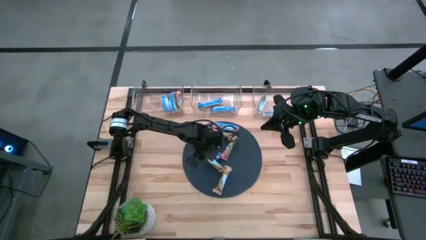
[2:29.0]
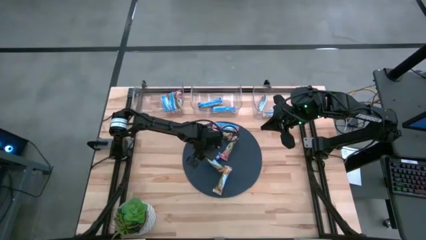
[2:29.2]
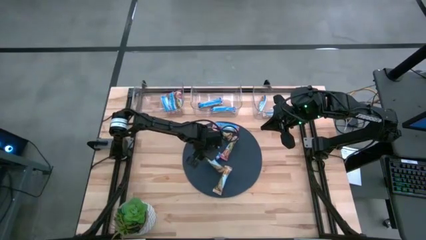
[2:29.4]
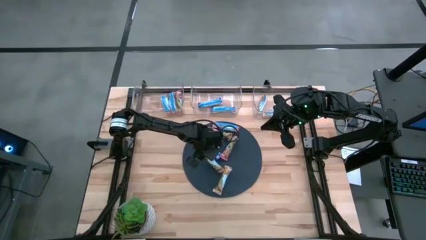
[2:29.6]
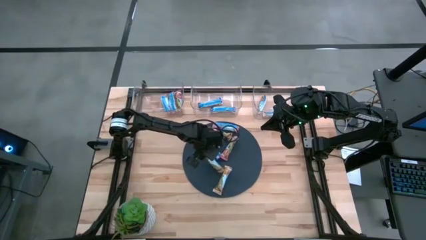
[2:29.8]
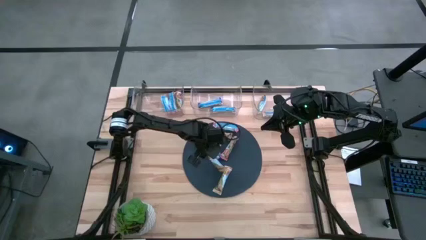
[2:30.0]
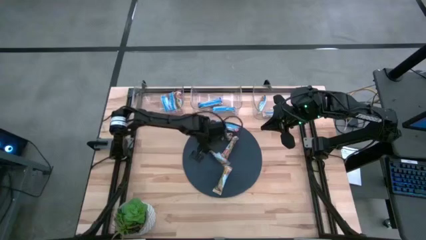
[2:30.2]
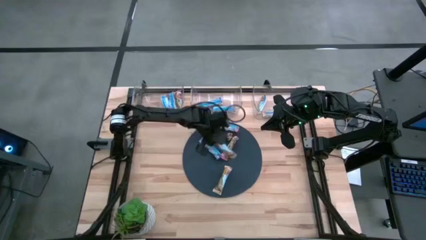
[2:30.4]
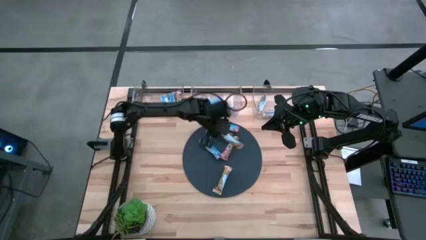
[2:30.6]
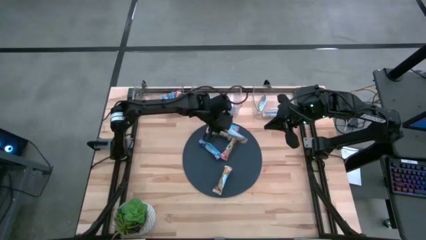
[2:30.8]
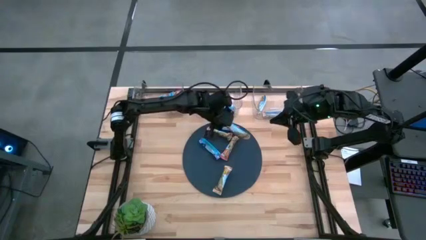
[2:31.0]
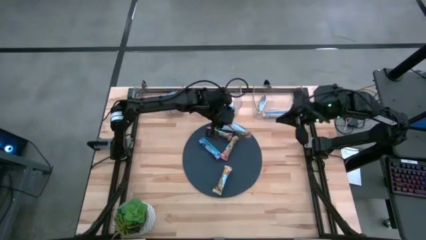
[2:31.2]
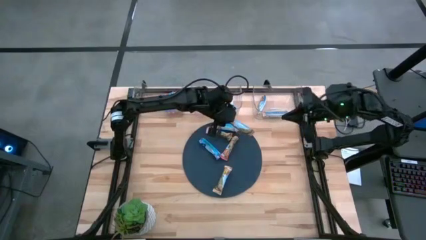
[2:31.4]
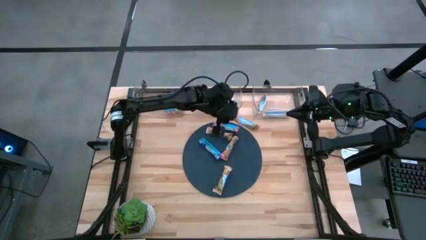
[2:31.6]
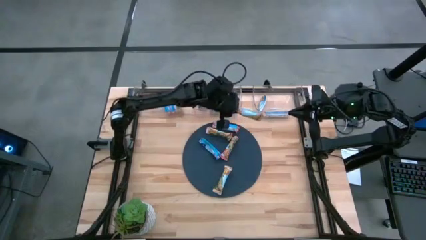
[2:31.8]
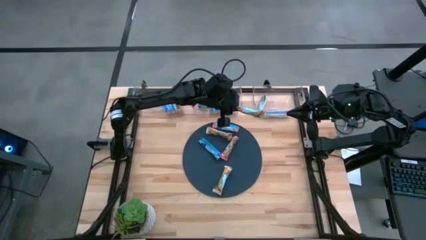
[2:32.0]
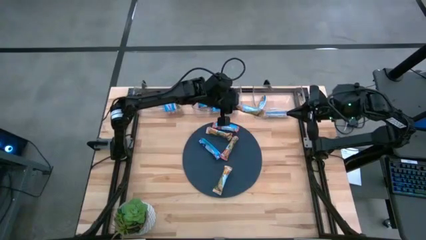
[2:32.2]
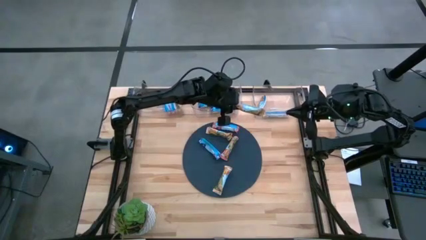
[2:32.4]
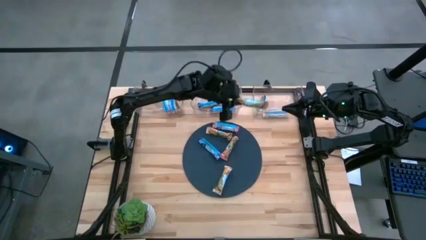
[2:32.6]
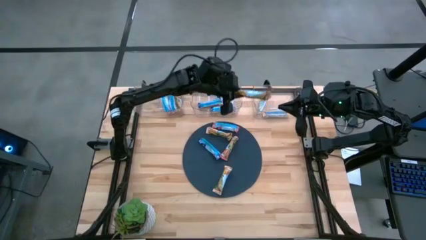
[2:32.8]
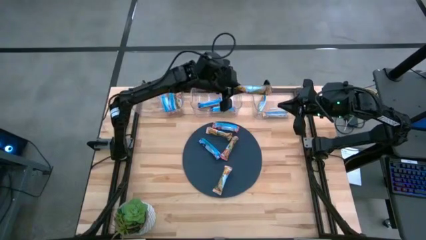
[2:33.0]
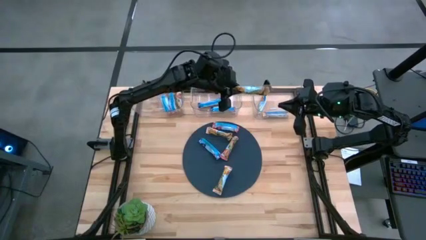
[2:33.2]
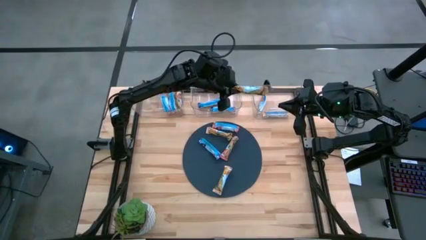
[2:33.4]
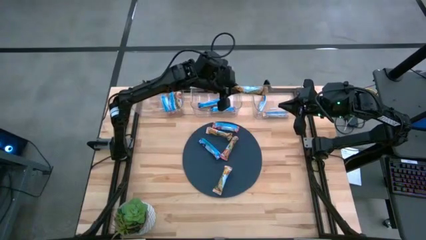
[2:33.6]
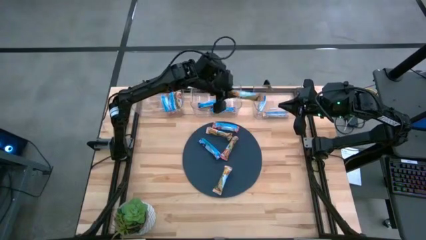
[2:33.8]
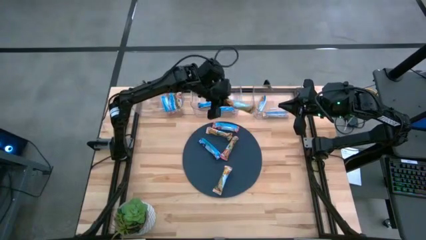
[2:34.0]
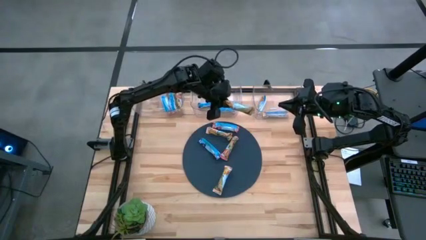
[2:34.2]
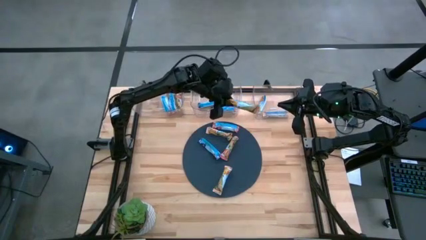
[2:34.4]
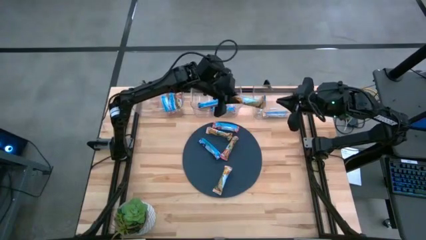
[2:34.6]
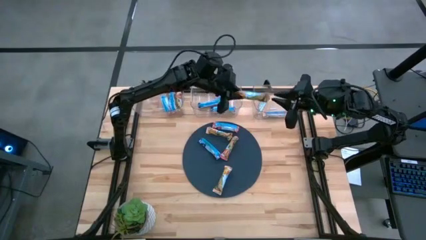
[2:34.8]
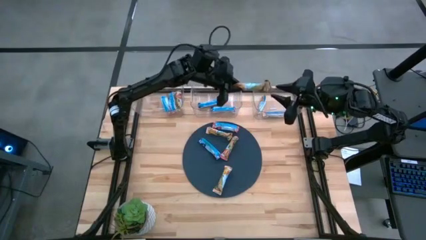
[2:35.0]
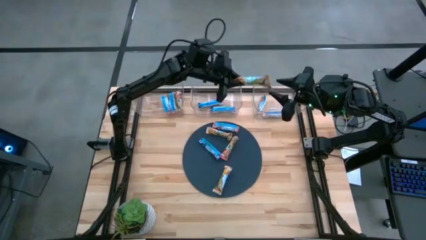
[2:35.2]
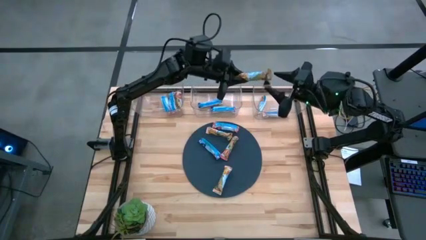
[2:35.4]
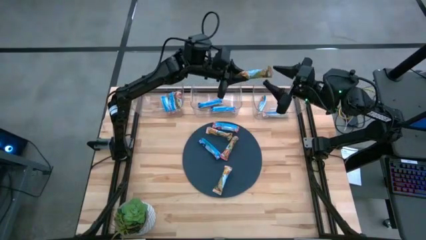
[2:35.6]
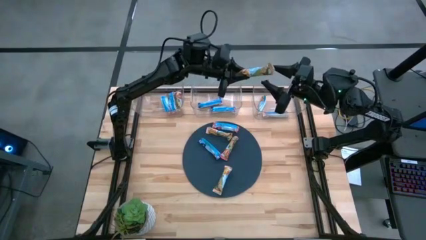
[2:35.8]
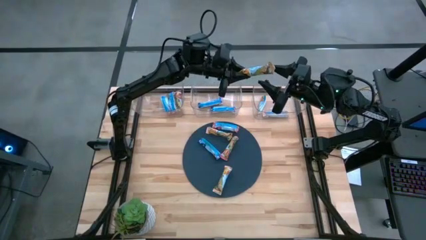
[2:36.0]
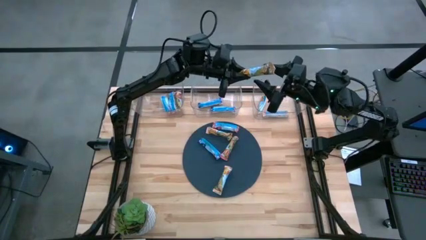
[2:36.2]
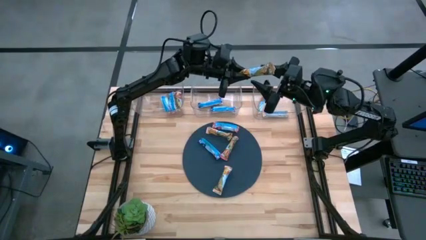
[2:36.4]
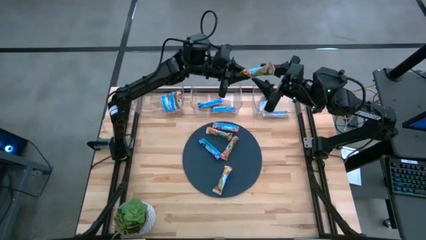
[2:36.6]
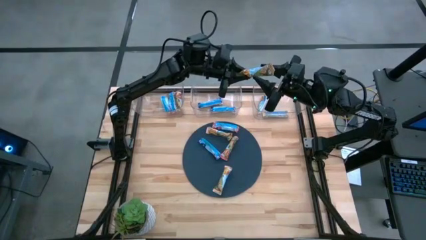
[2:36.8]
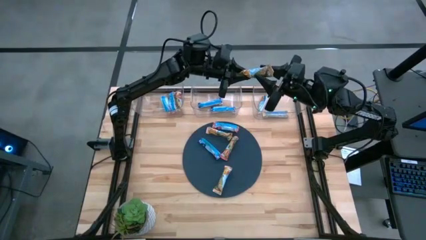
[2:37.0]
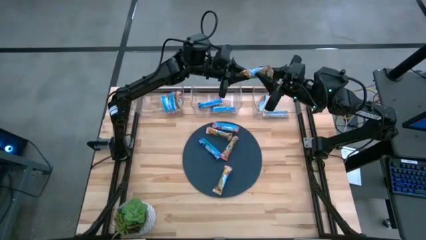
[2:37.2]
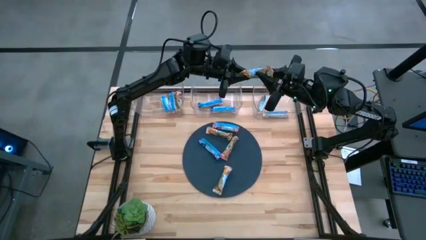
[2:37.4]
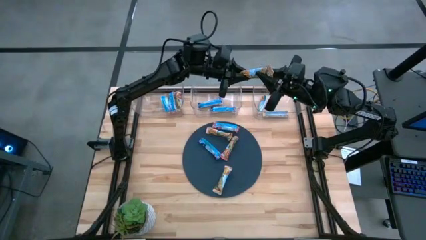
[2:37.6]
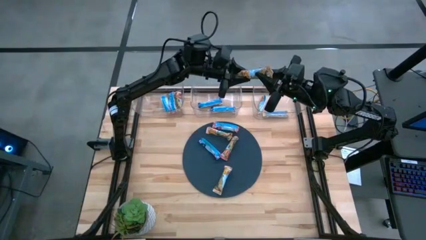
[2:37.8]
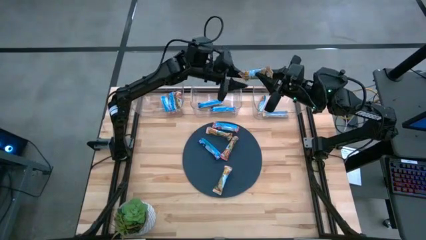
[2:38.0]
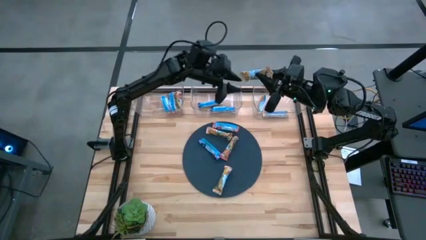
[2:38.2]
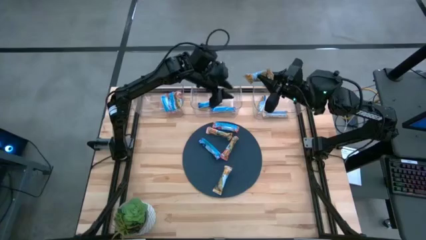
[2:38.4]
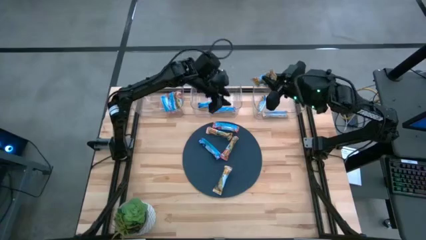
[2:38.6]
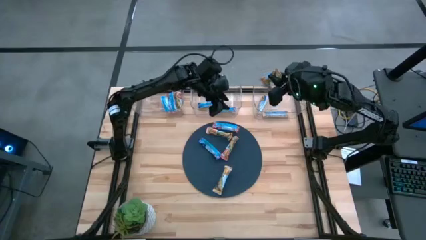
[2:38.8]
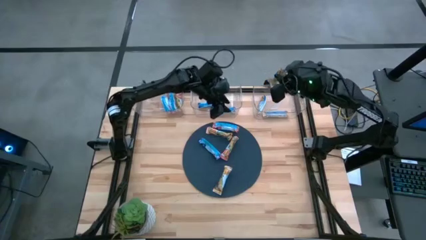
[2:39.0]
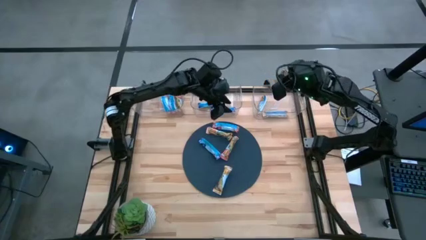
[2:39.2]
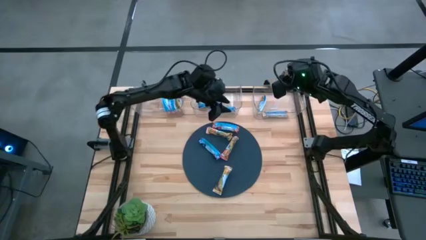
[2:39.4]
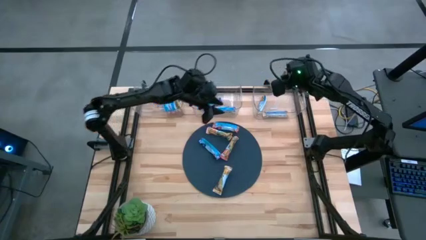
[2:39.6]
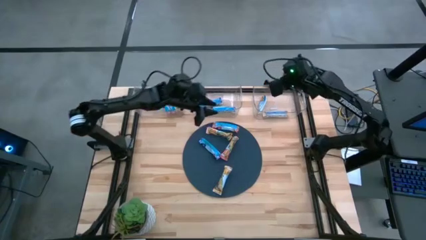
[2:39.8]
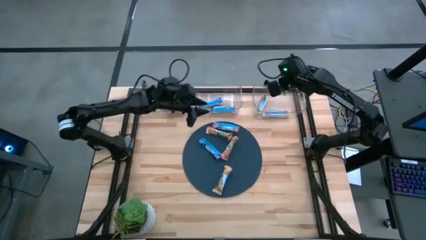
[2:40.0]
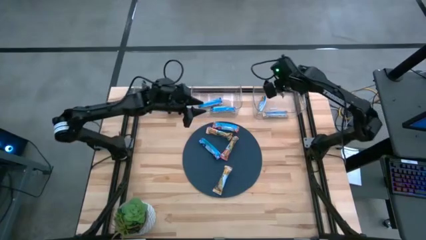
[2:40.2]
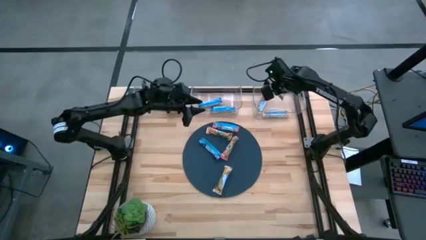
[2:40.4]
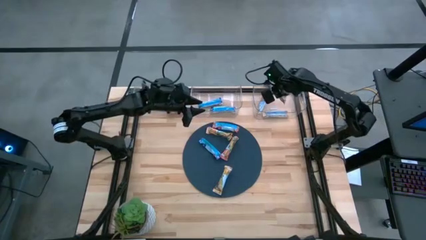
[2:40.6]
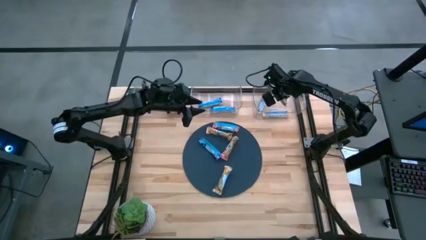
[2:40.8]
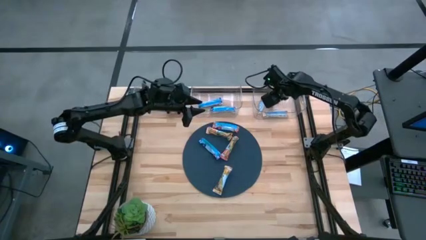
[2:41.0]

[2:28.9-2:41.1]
Task: Pick and place Granola Bars by type
Put the yellow granola bar into the right transparent bin

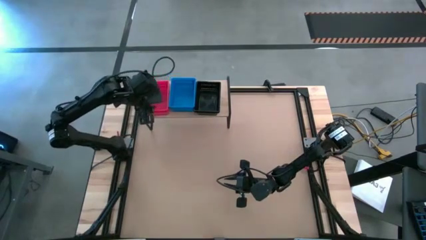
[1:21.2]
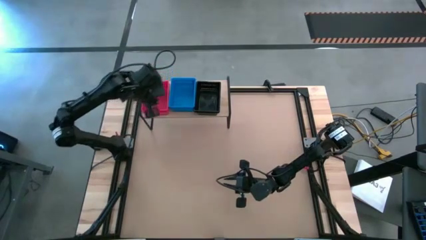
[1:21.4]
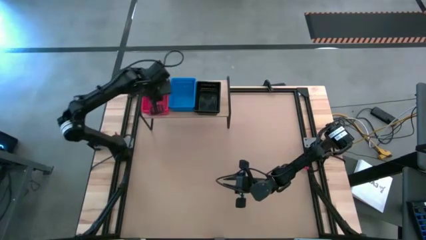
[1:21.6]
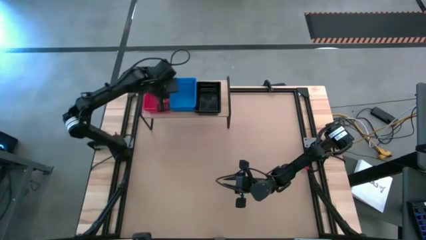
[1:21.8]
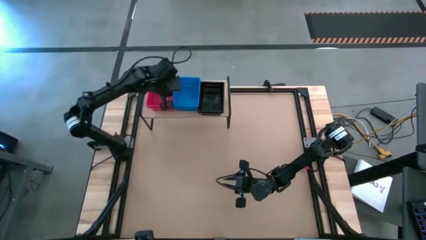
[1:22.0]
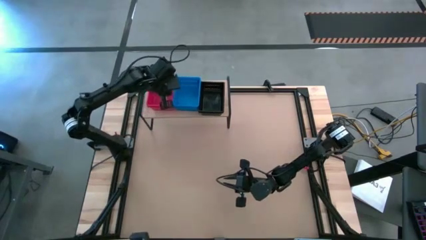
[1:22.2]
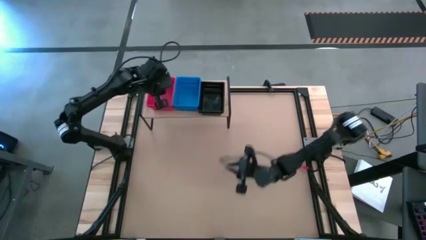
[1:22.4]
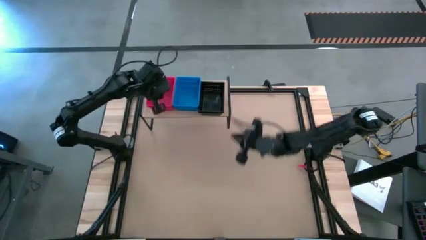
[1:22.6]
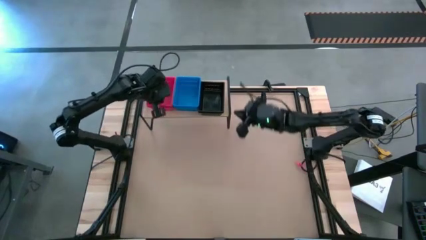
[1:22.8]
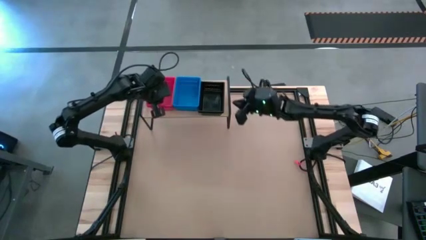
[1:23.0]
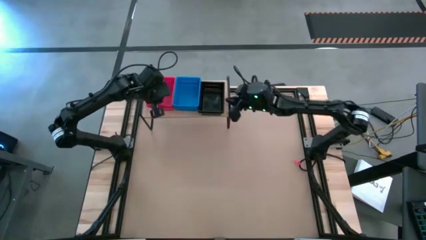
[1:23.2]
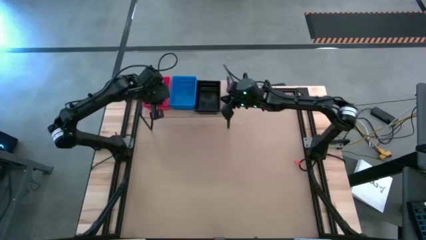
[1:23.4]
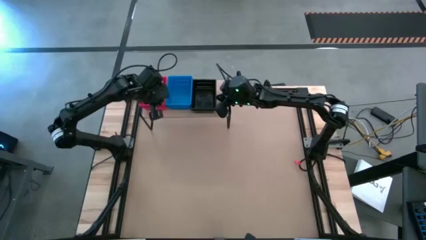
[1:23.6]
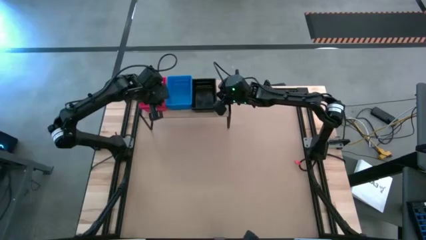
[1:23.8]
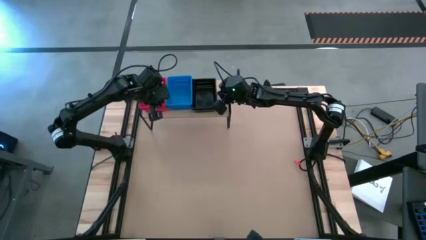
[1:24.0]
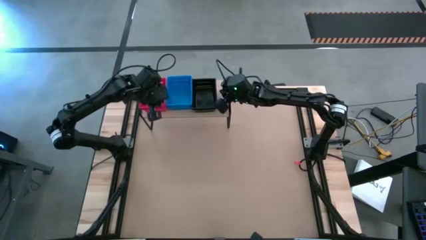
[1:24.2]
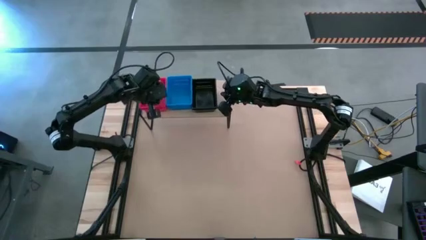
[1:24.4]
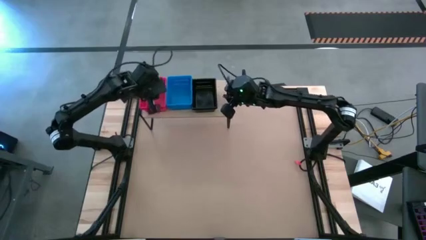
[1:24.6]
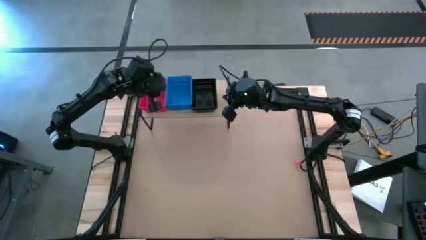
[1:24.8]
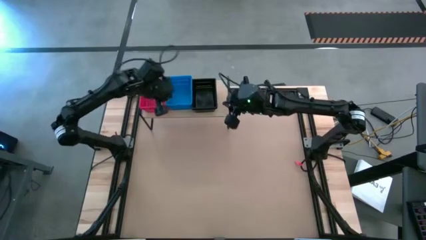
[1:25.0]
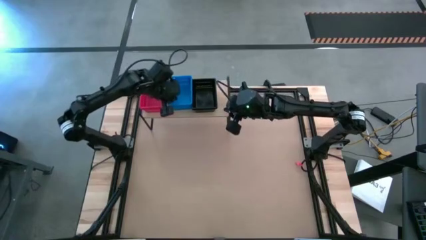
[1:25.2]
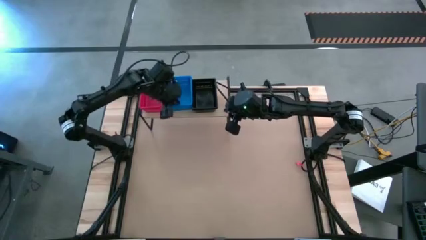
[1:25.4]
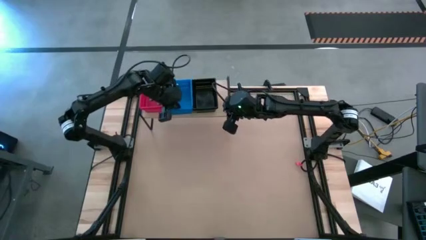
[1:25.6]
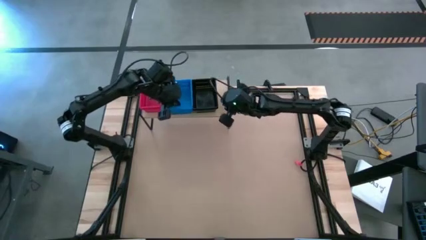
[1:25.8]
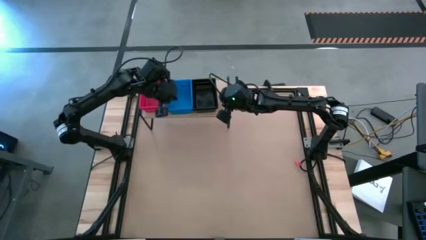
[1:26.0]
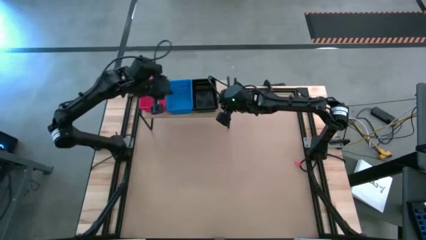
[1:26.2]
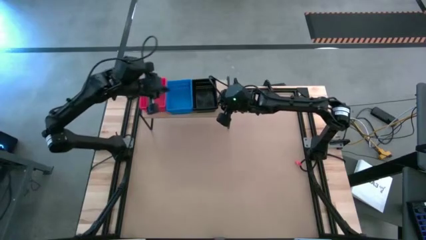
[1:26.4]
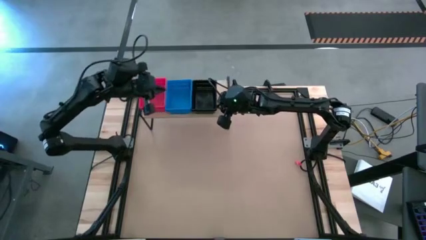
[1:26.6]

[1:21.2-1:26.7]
Task: Stack baskets on shelf by color
Adjust the bins on the shelf
